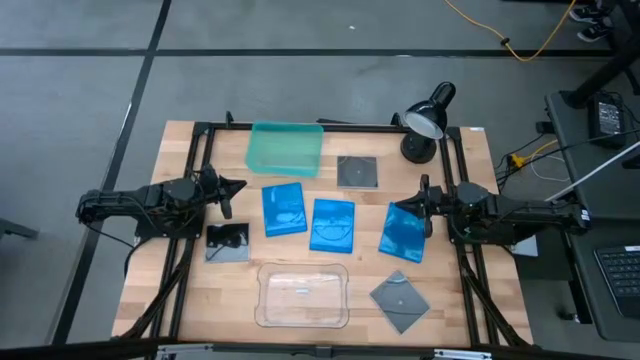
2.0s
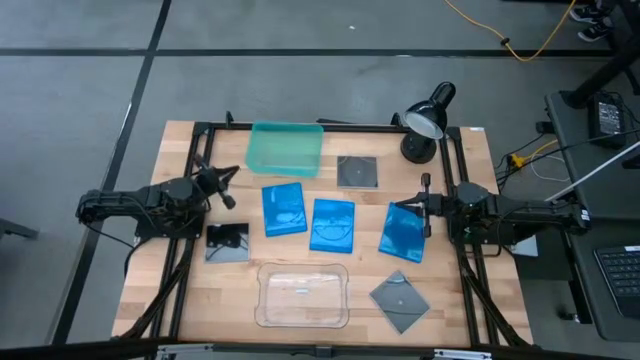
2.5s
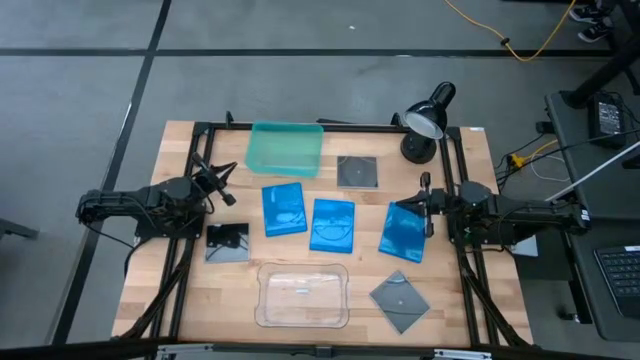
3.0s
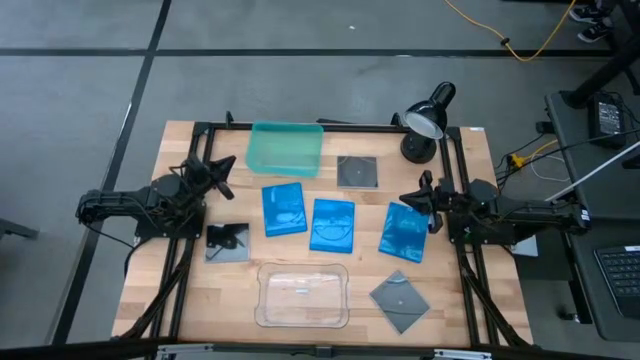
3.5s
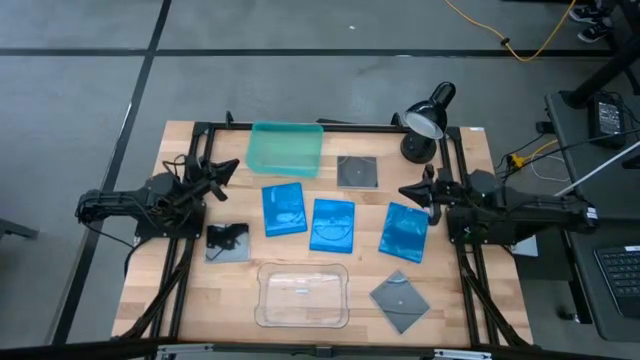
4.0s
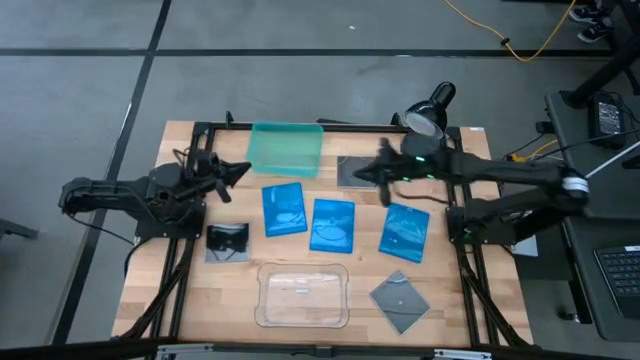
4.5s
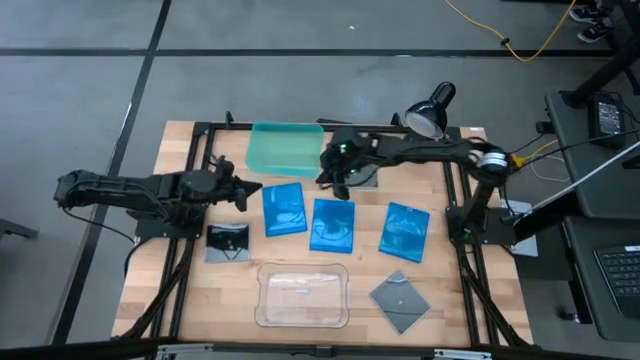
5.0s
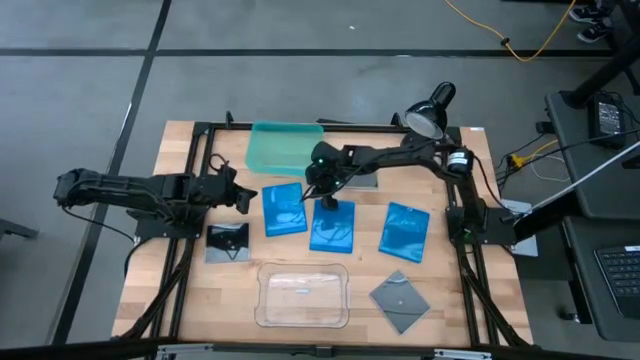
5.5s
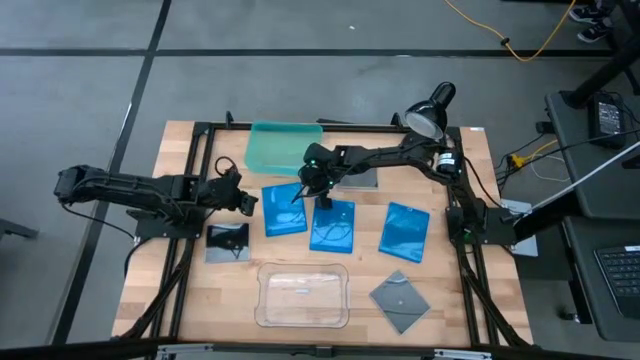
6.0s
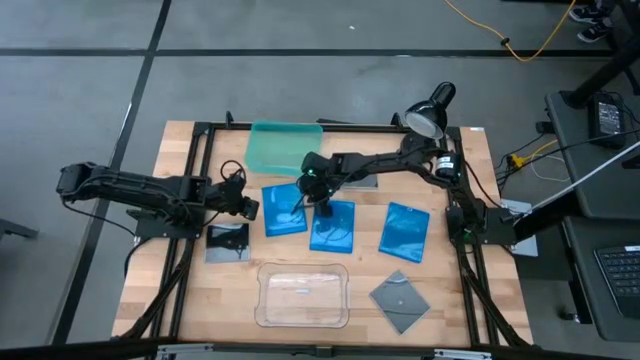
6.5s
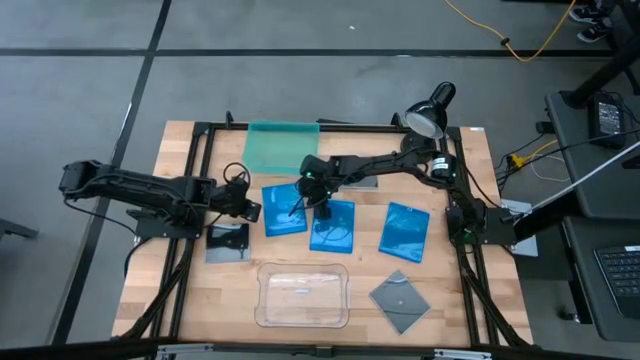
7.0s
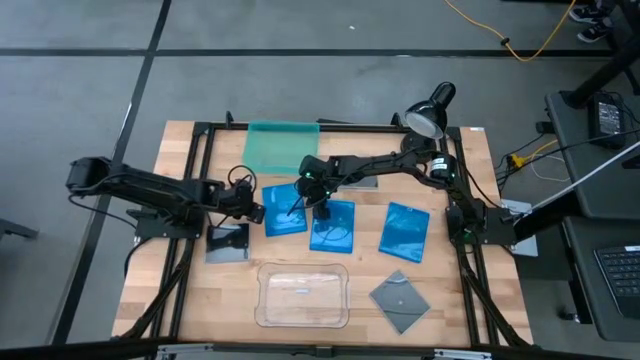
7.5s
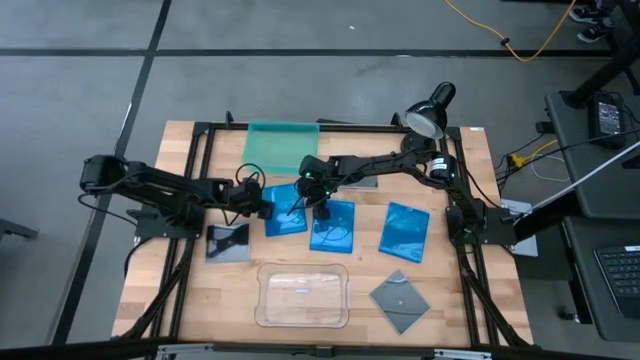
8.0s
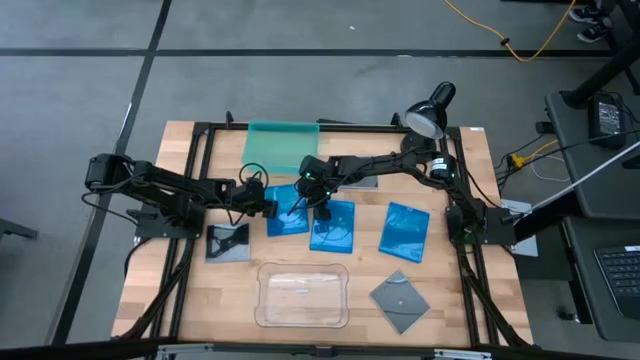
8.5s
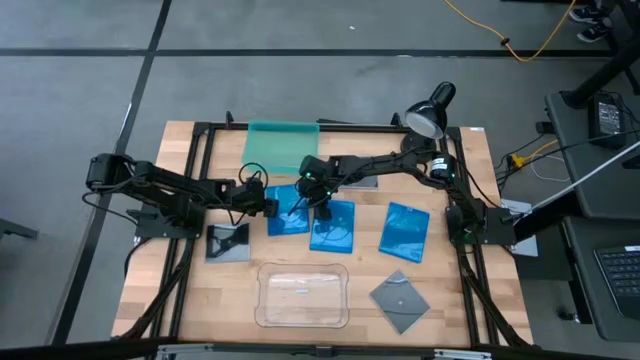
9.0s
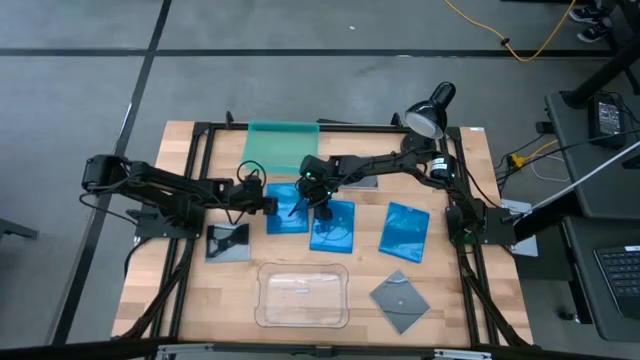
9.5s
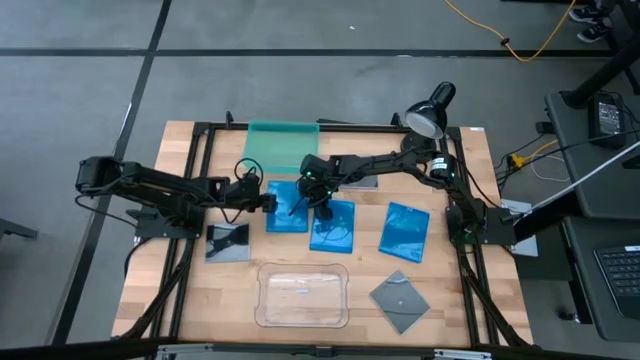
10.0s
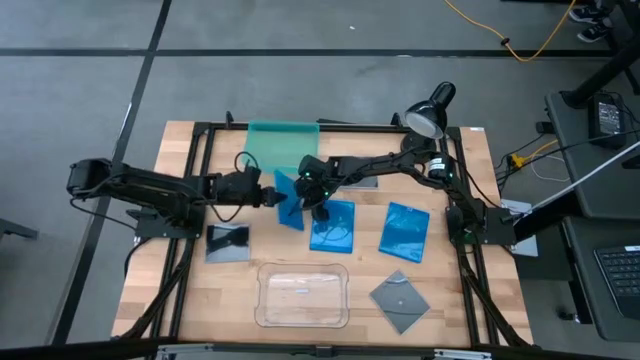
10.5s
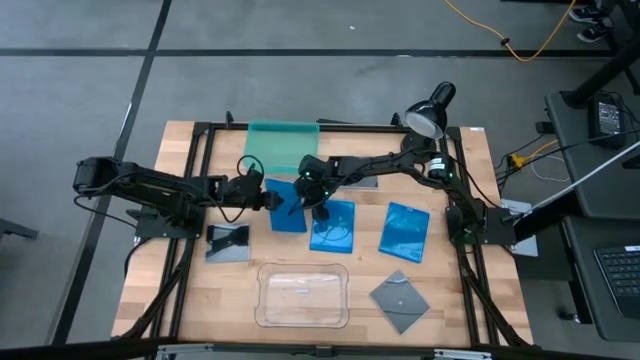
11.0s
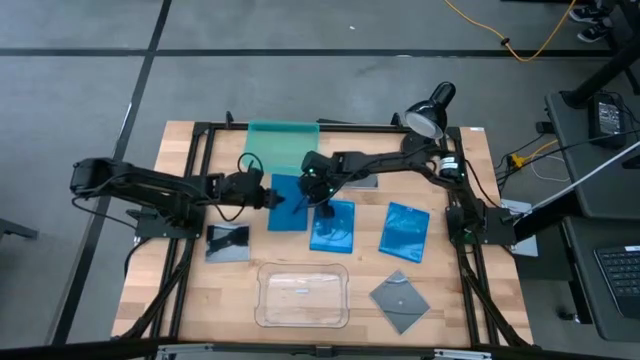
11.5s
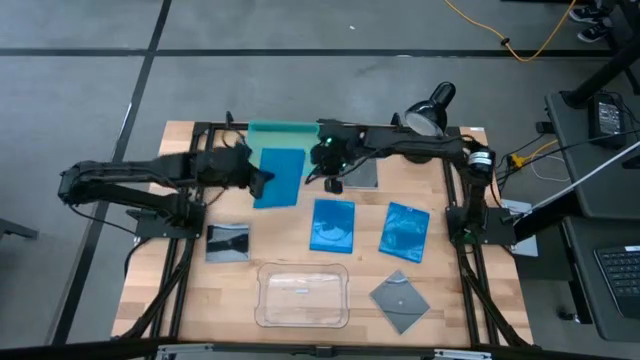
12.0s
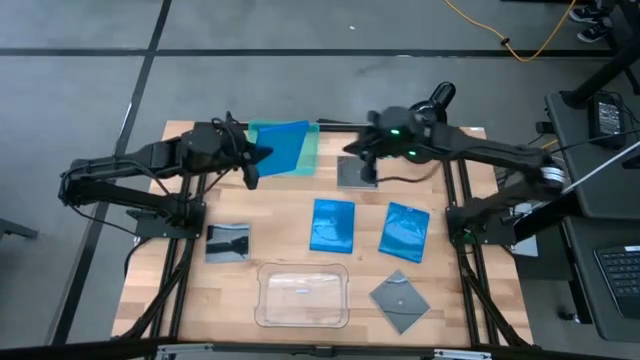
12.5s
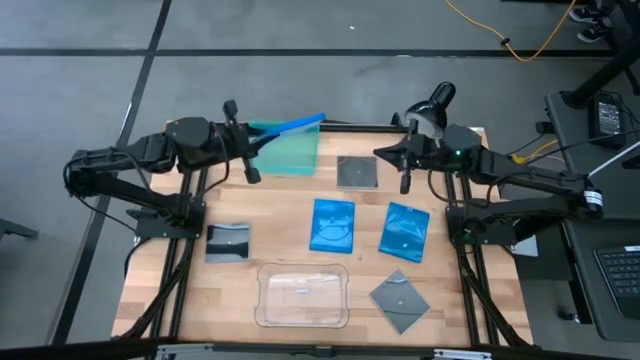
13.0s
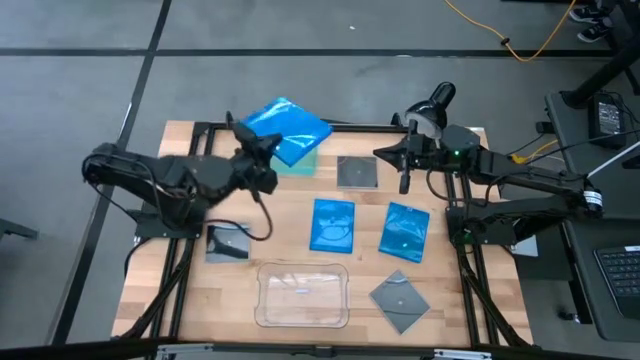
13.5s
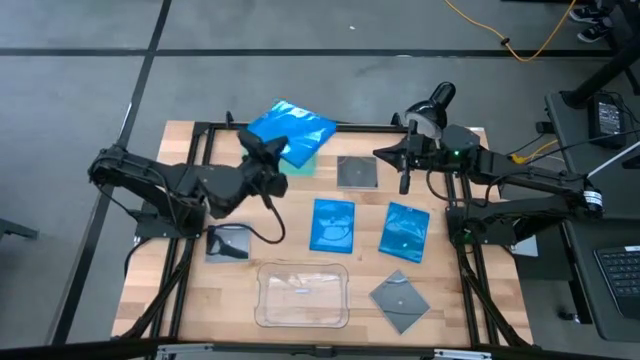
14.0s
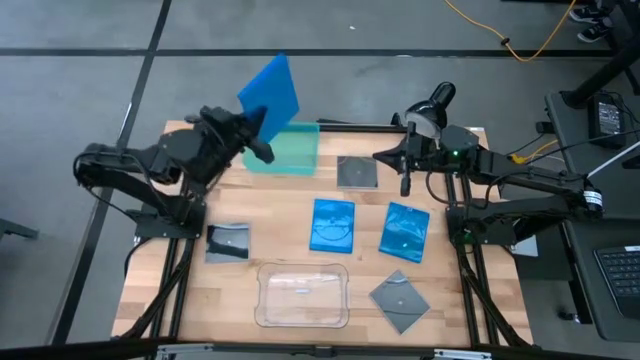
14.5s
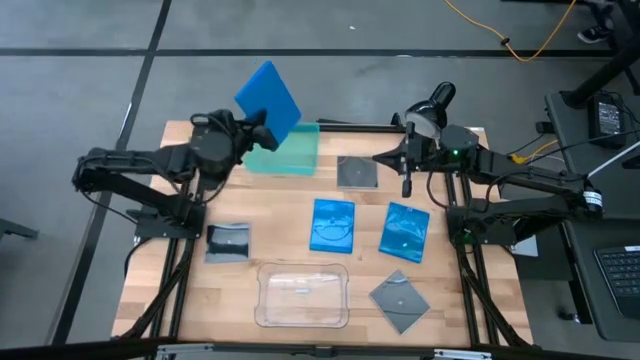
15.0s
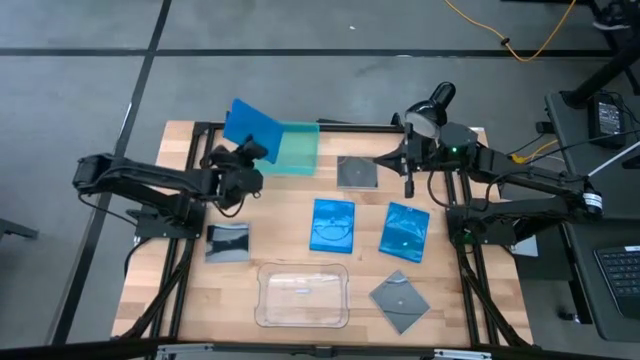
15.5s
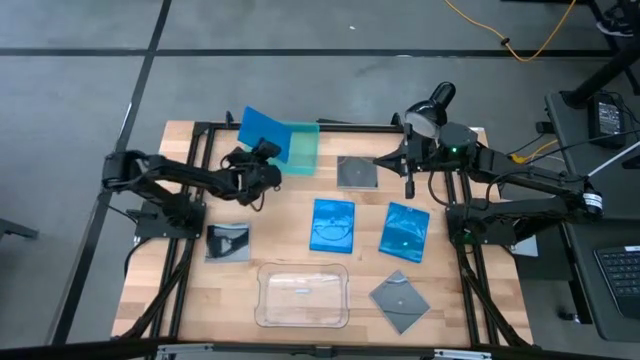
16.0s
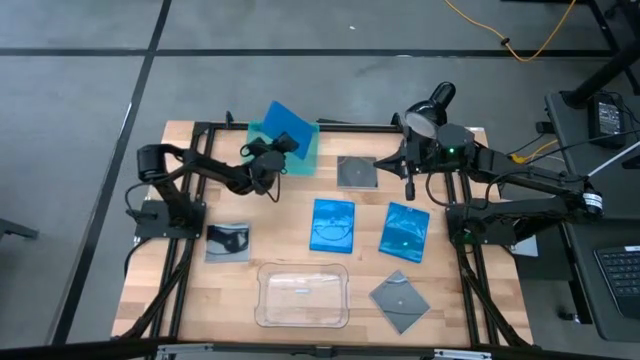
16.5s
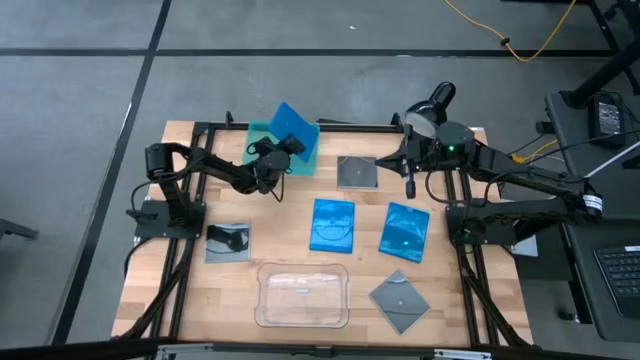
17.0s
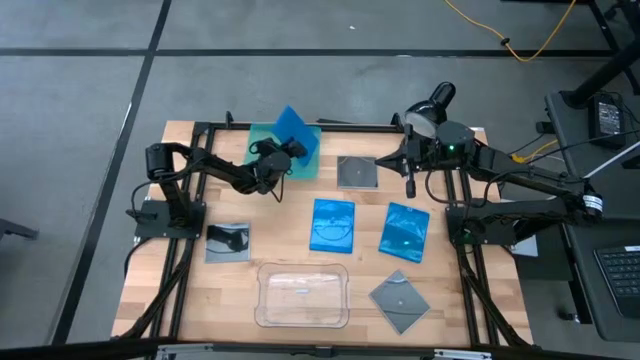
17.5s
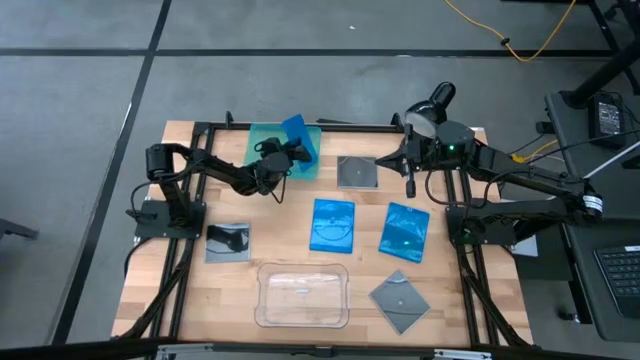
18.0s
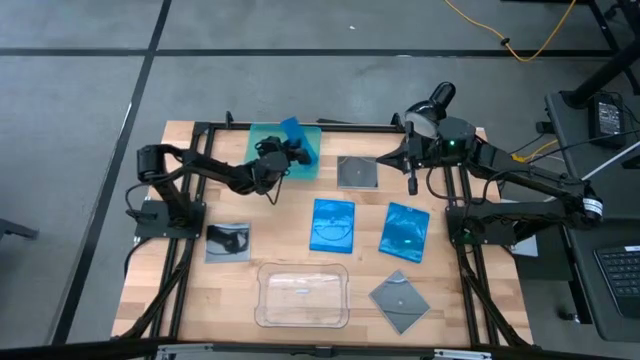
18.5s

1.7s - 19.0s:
Task: Pick & place jewel cases by type
Put the left blue cd case into the green bin

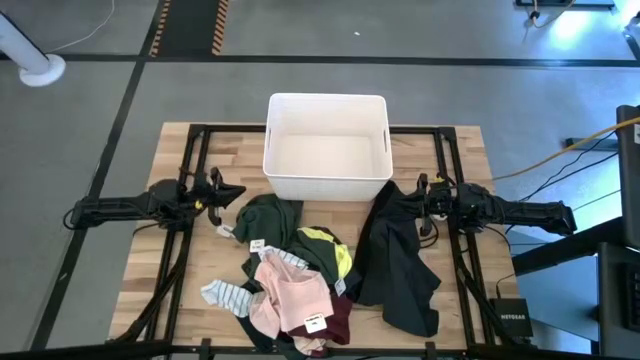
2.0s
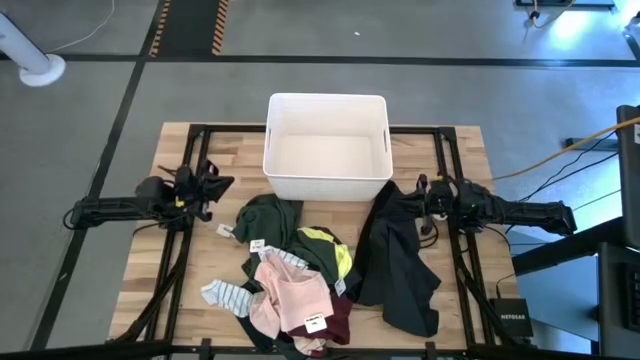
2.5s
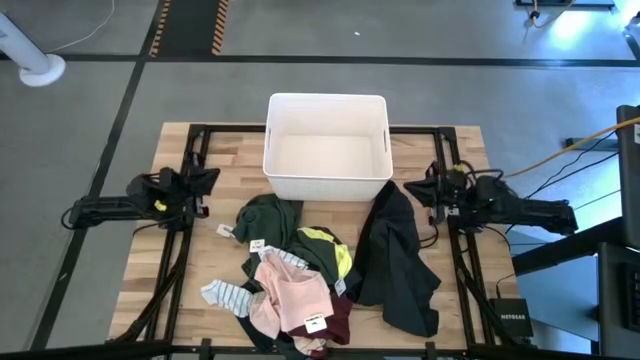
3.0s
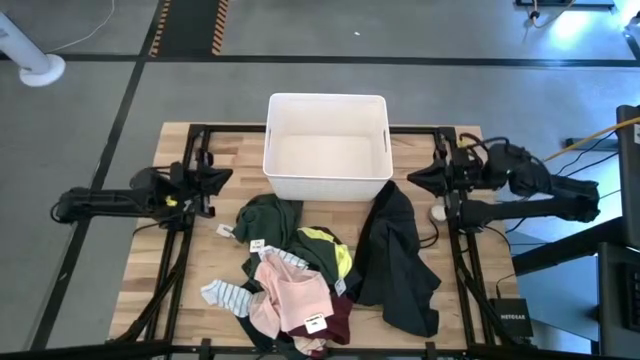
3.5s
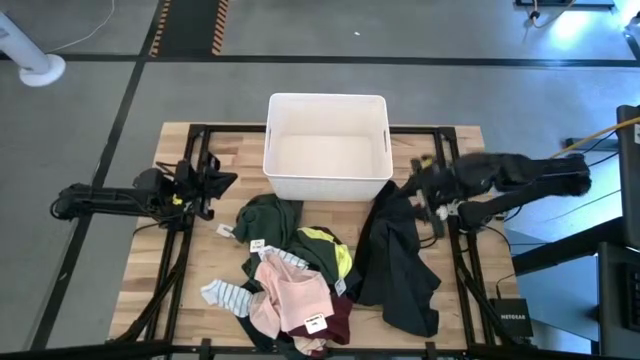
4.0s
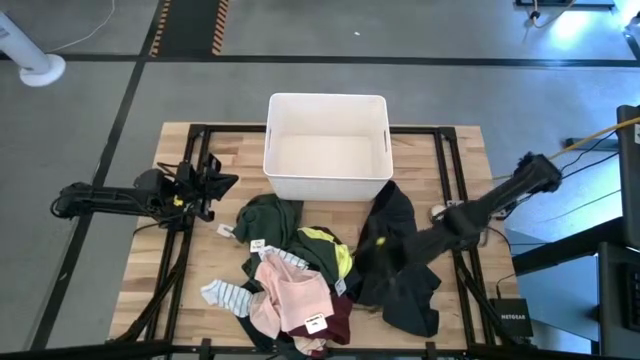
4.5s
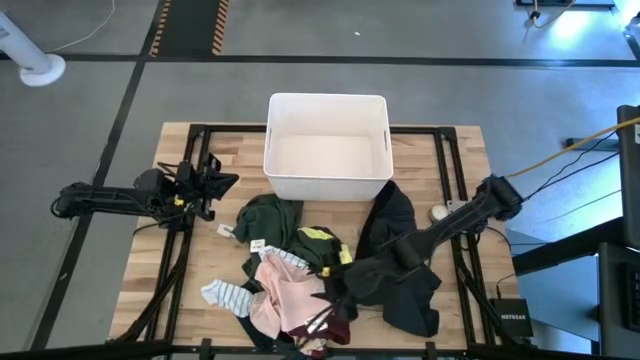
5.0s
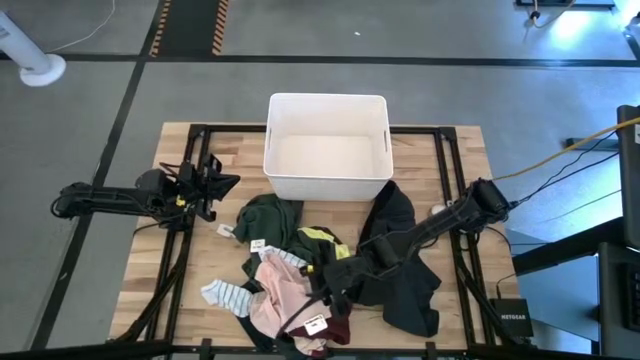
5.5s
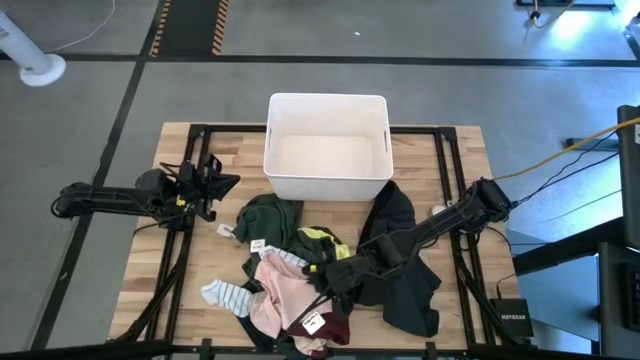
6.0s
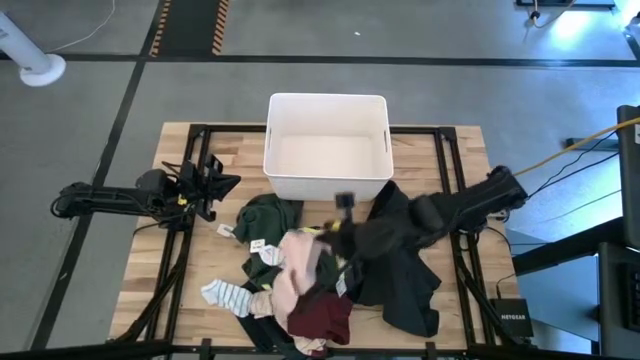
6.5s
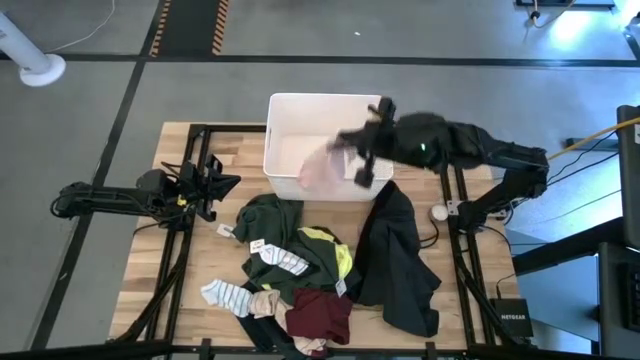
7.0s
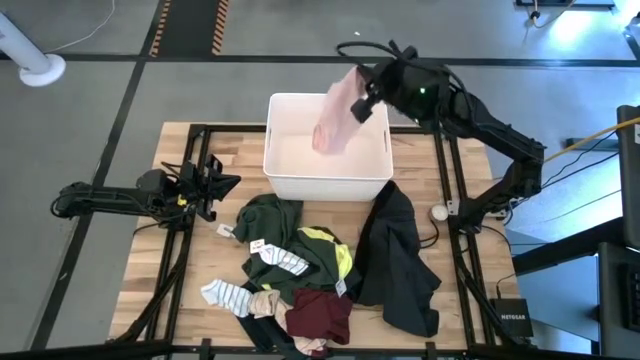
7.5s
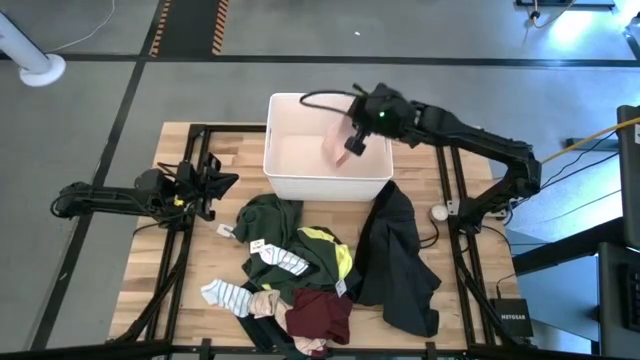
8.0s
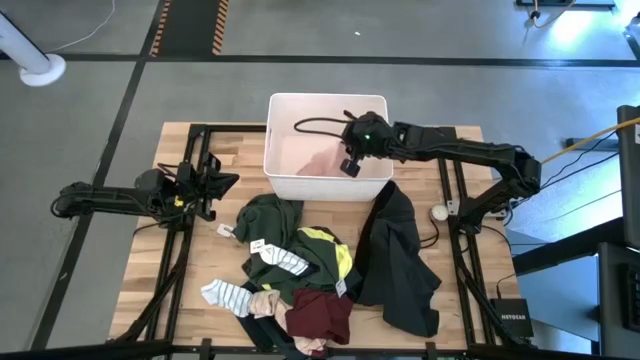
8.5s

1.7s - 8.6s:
Task: Sort clothes
Put the pink underwear into the white bin
